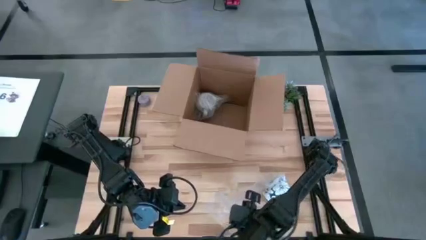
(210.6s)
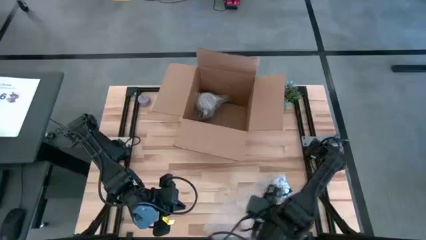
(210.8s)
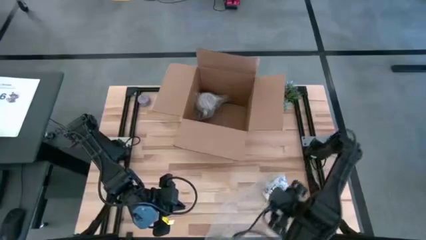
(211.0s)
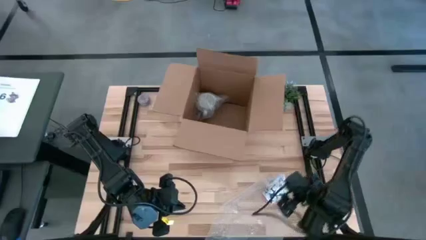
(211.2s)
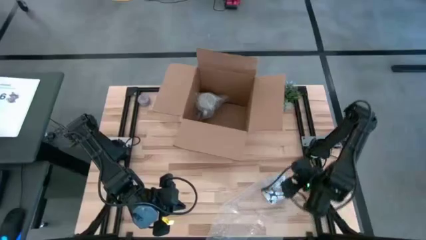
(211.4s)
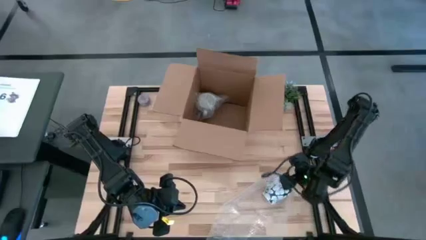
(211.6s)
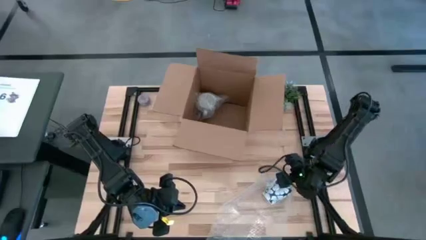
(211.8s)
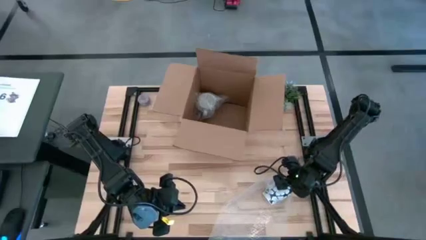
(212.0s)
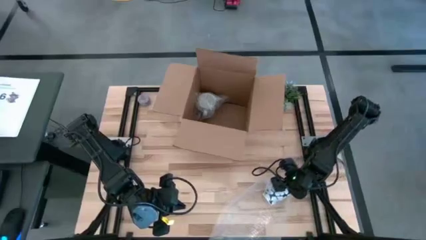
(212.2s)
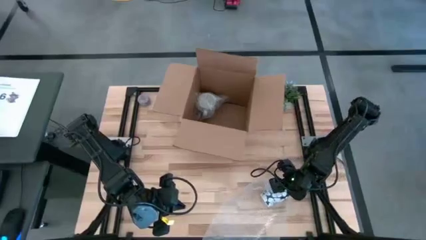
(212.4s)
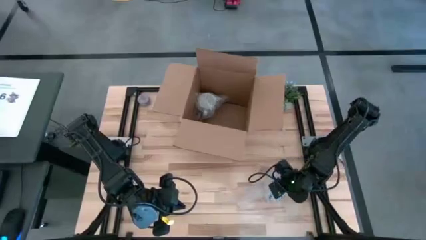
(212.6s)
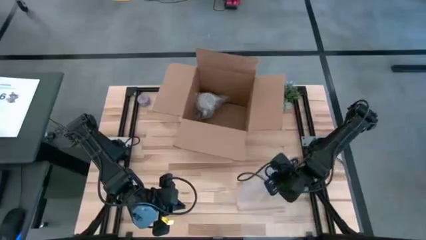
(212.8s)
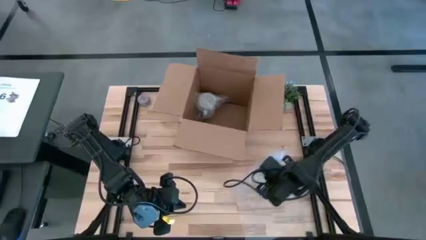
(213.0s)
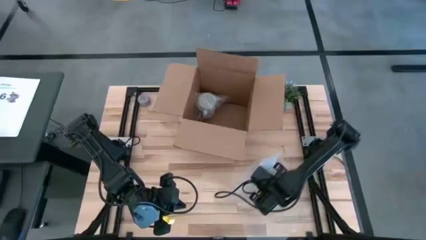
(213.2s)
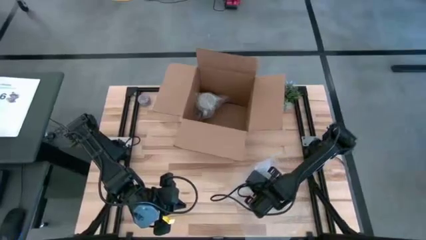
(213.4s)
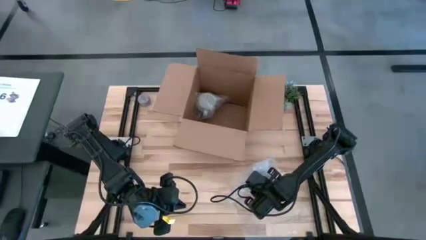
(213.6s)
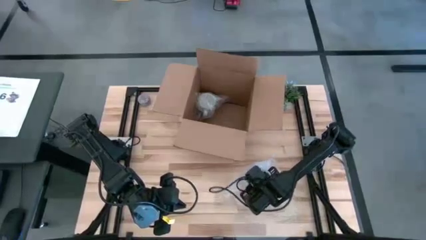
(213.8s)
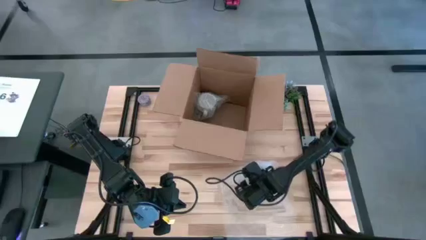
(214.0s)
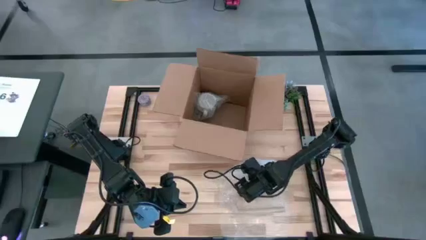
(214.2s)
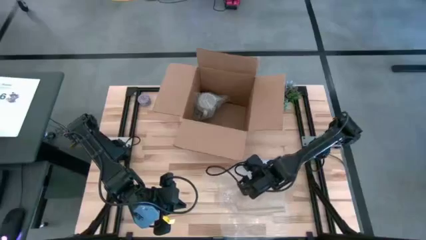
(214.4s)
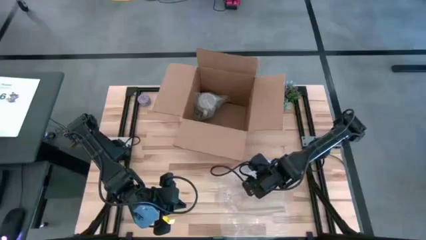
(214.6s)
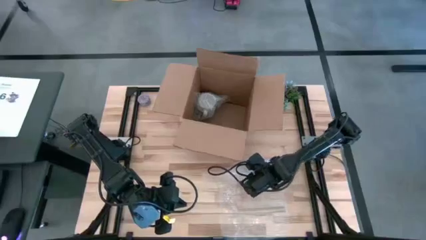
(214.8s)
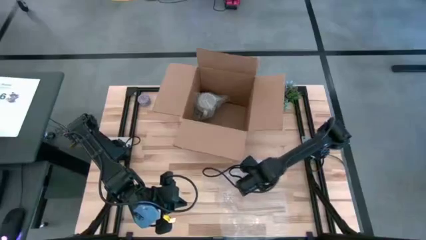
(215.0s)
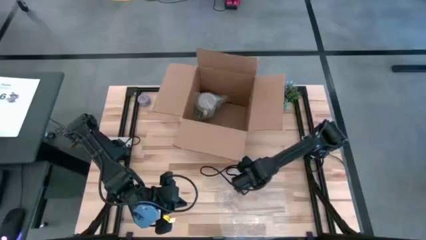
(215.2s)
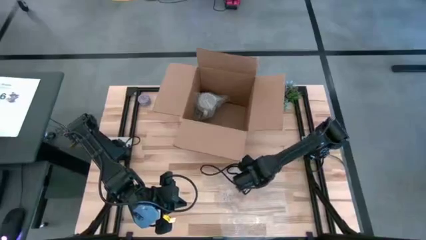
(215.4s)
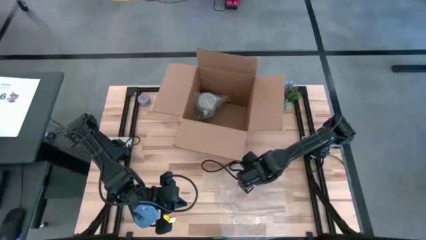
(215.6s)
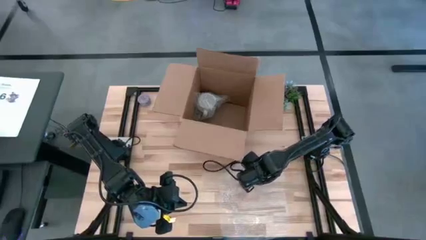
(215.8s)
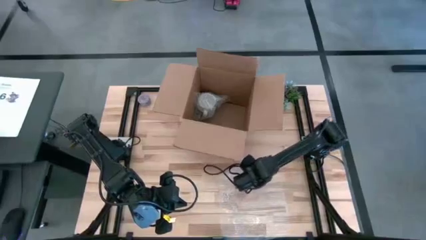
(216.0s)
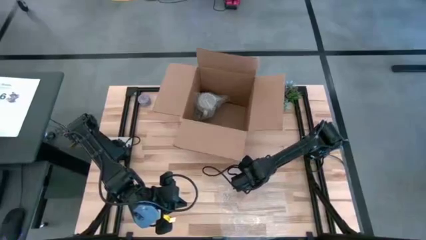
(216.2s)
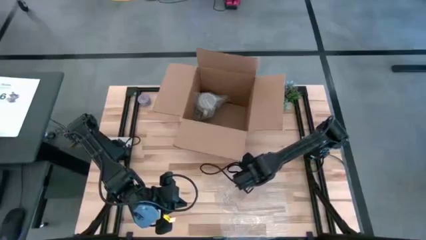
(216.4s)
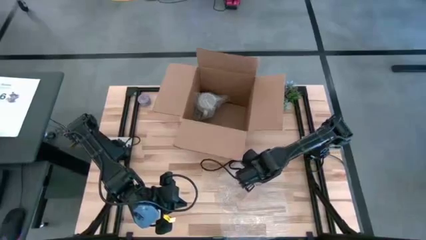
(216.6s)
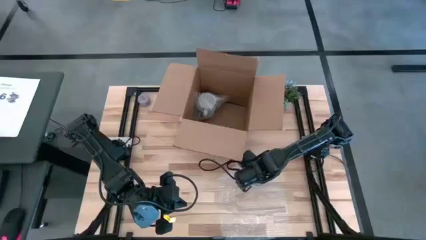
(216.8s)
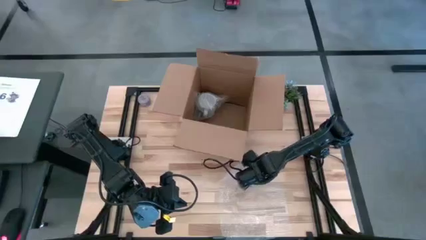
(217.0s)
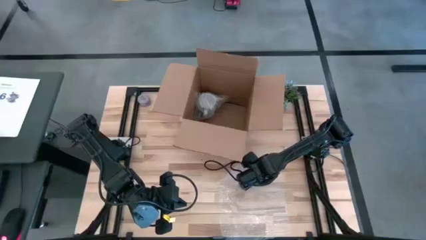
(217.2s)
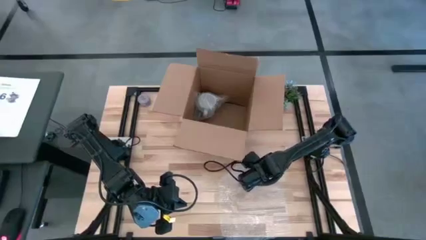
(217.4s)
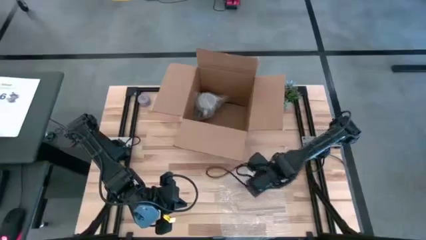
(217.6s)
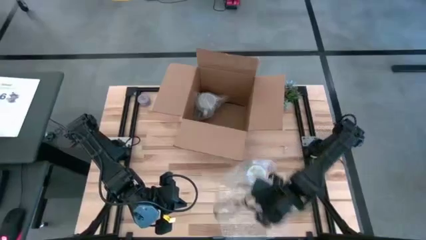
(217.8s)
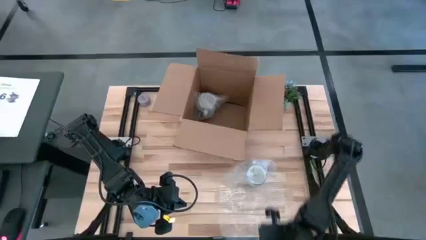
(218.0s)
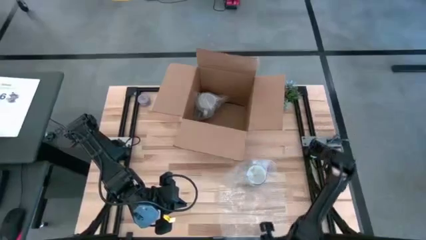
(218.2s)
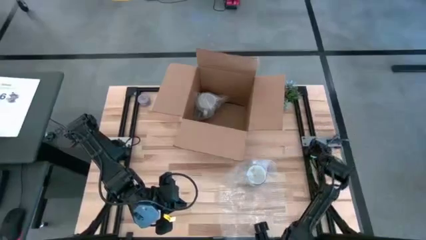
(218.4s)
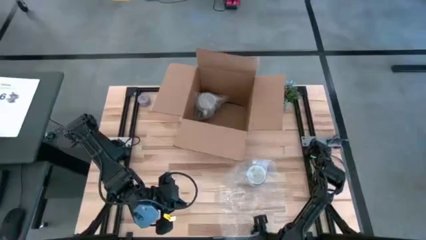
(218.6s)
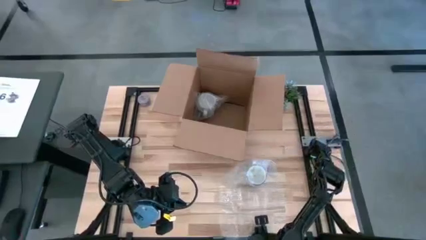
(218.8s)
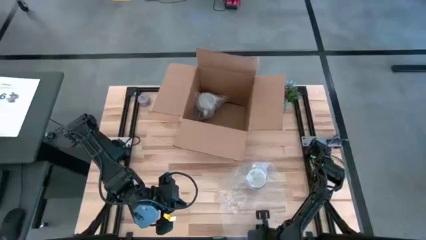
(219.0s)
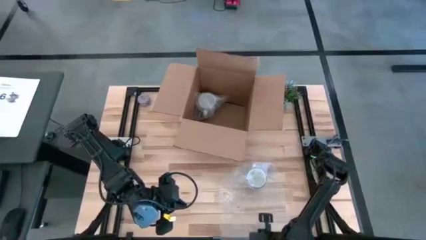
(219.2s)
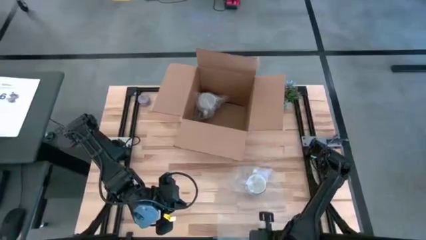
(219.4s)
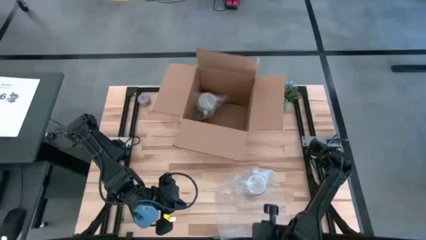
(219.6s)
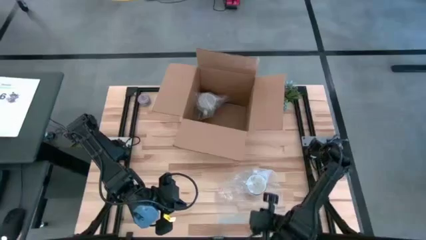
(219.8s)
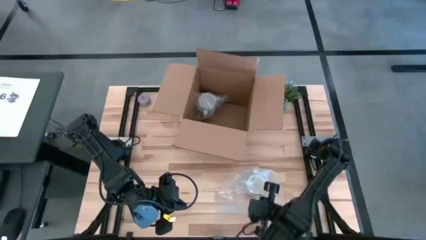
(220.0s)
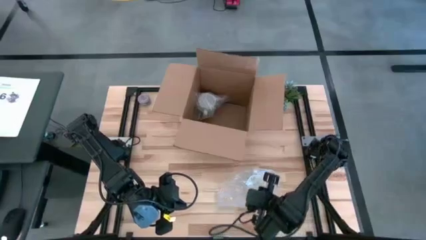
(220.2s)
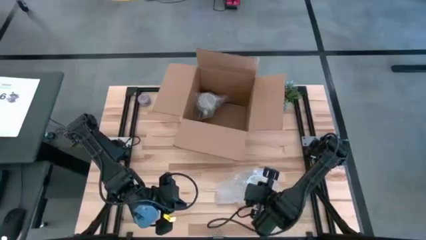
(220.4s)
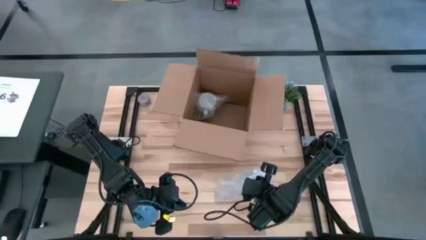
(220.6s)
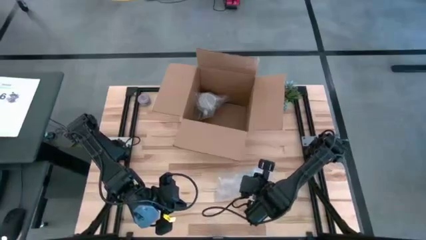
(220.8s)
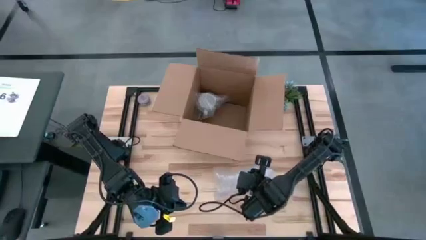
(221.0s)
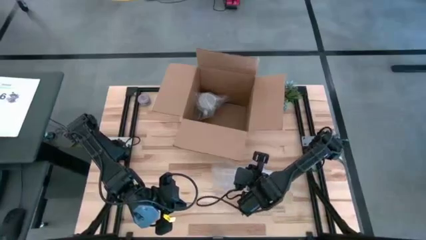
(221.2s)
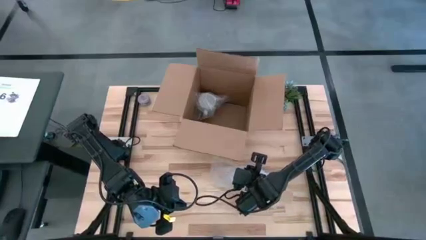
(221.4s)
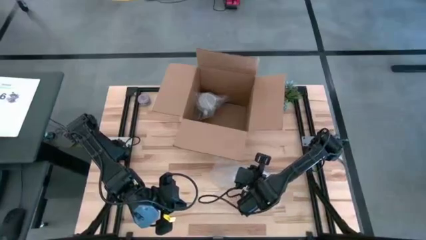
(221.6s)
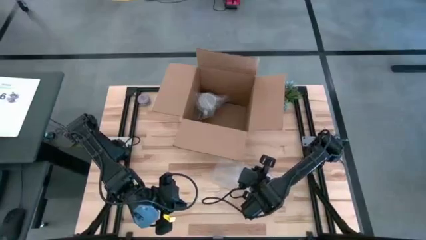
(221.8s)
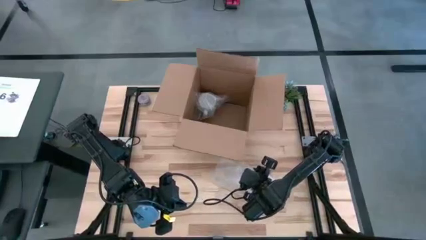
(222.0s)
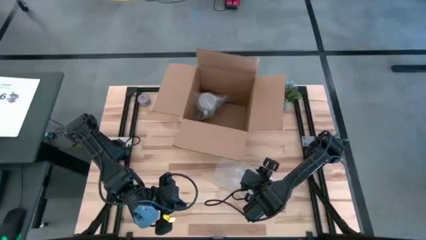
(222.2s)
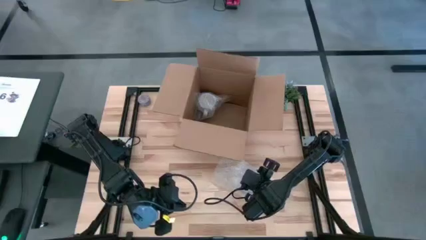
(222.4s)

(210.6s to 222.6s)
Task: wrap mug
Wrap the white blue mug with the transparent bubble wrap

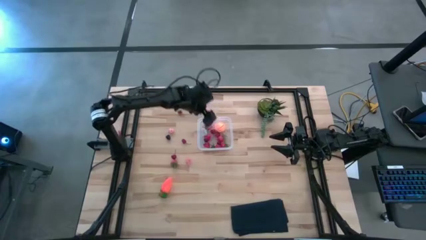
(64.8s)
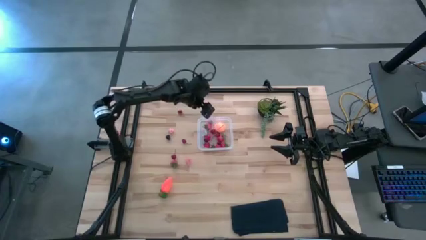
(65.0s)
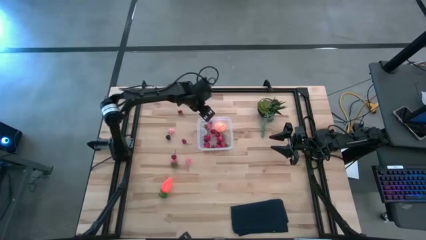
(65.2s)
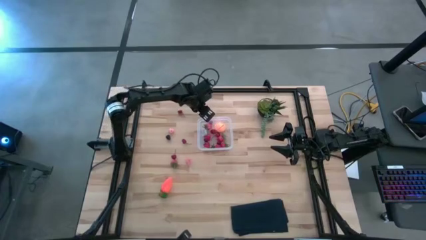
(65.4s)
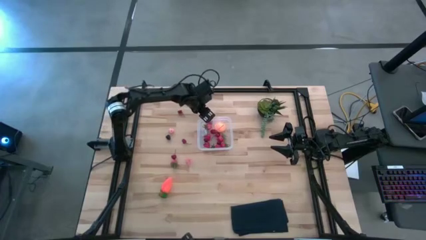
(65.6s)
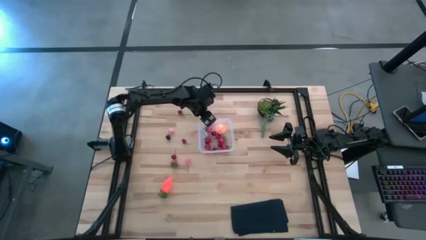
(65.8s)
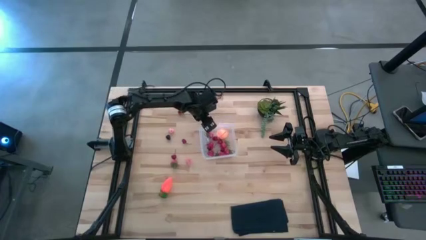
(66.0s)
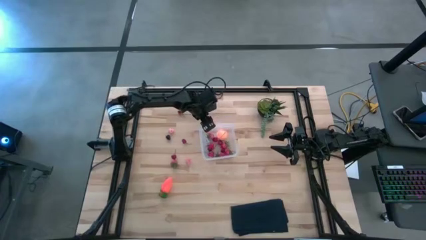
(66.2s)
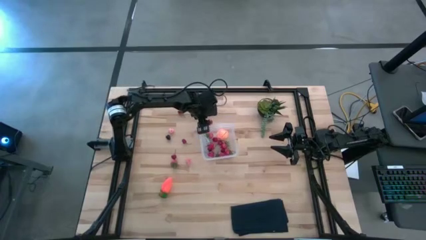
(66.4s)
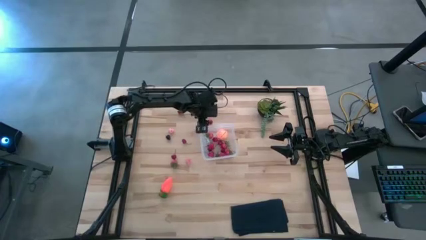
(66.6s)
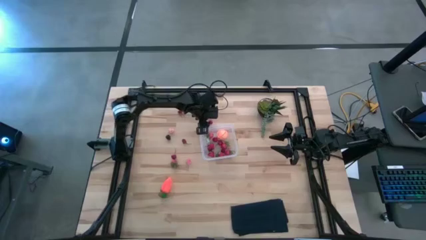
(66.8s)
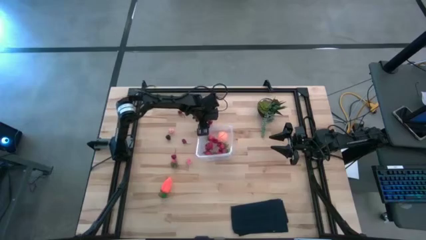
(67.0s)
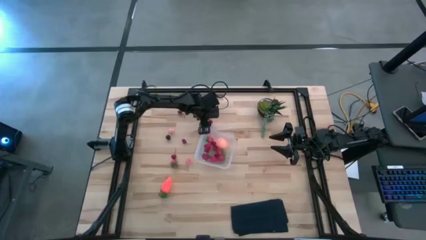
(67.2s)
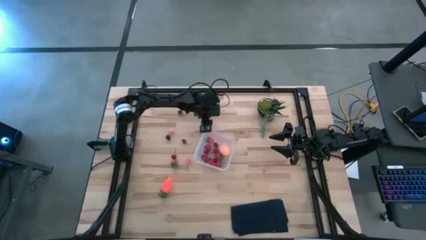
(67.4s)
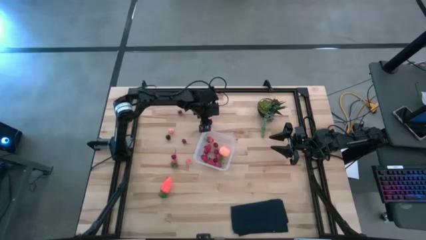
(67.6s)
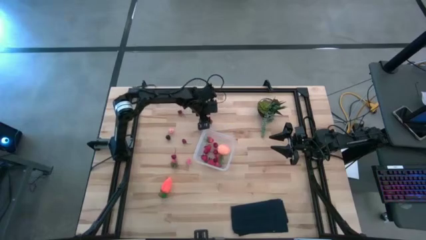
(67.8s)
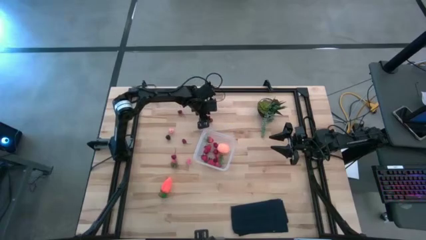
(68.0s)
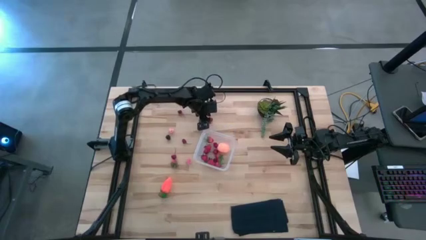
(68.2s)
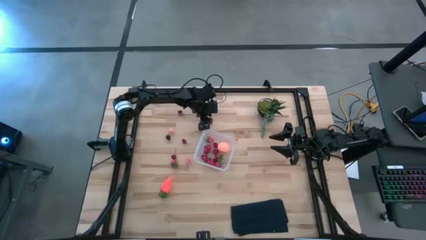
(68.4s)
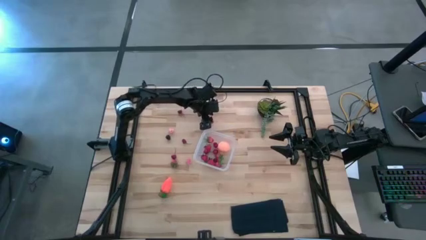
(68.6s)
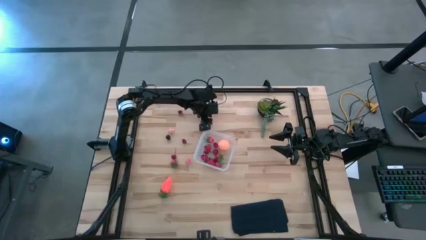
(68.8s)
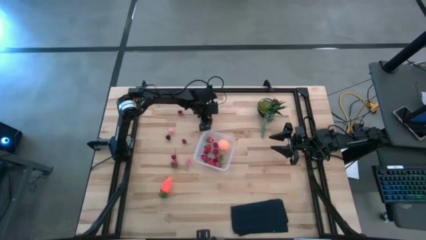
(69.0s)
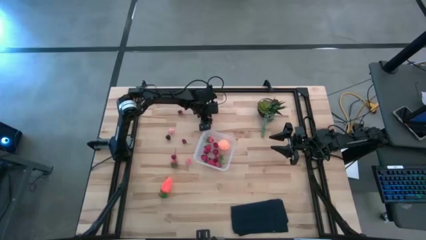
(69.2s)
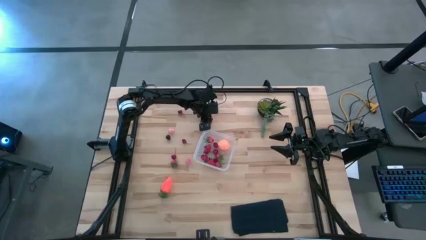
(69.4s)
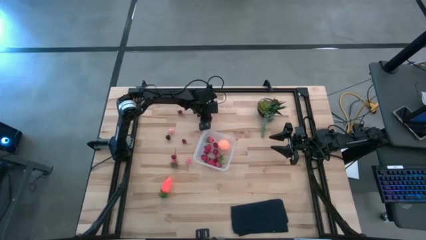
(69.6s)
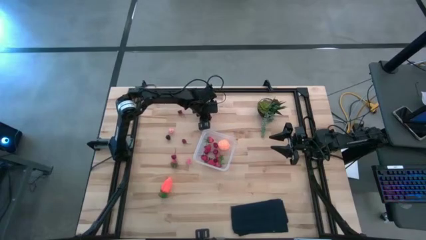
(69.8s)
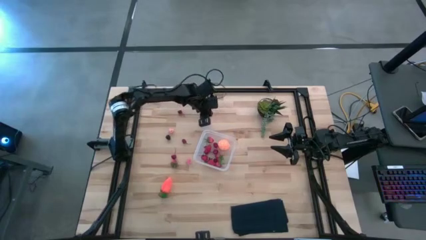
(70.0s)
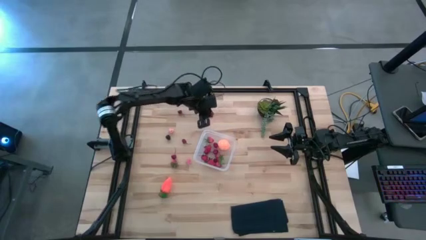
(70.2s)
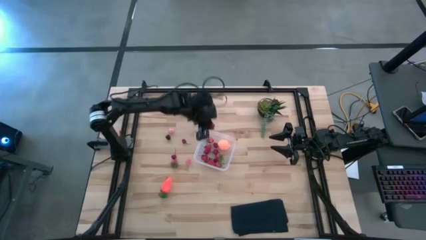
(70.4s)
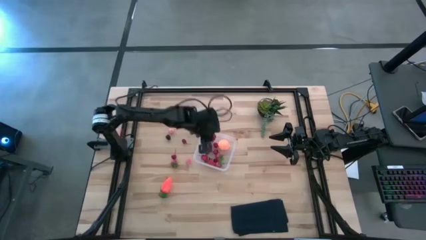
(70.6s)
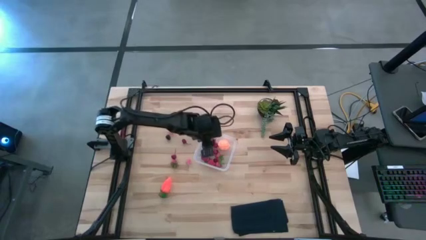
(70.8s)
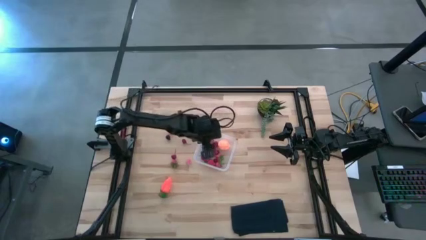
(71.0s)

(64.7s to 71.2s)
Task: Pick and placing Produce into tupperware
Put the red cherry into the transparent bin
